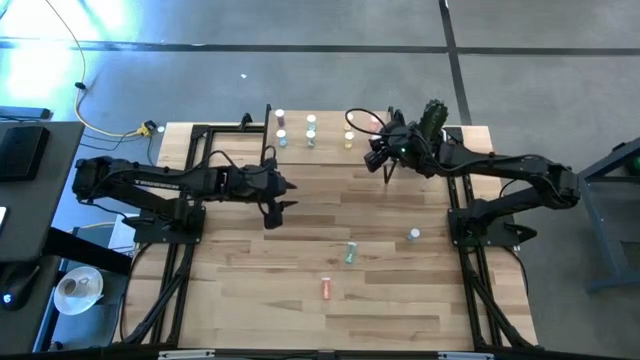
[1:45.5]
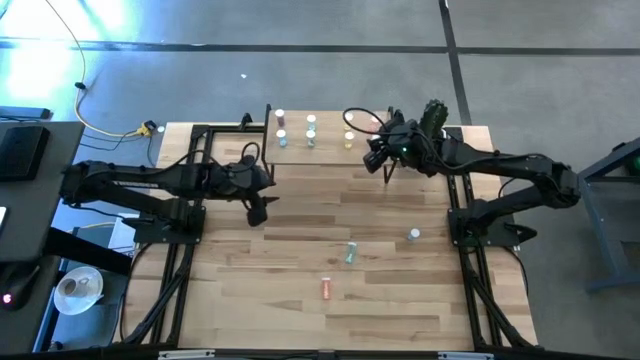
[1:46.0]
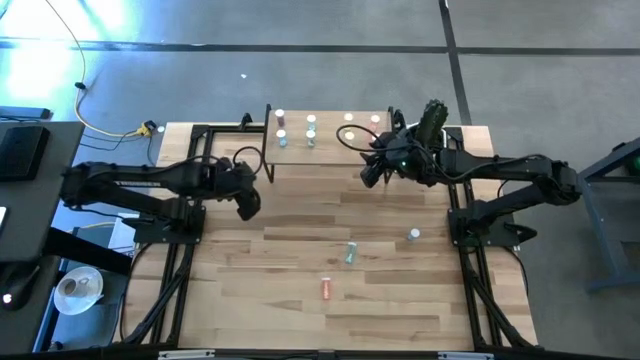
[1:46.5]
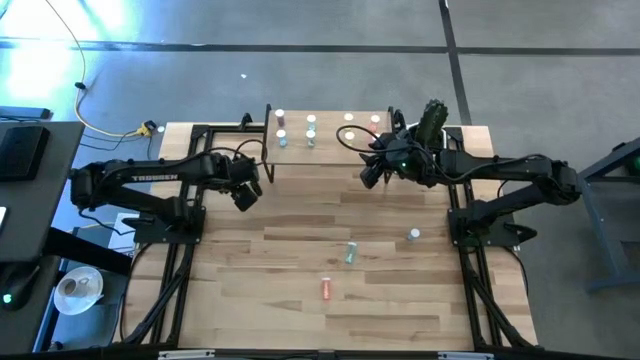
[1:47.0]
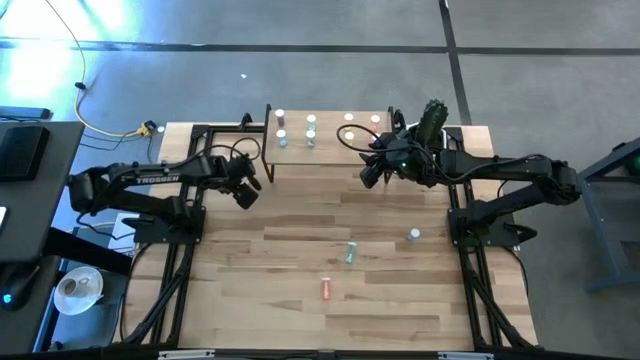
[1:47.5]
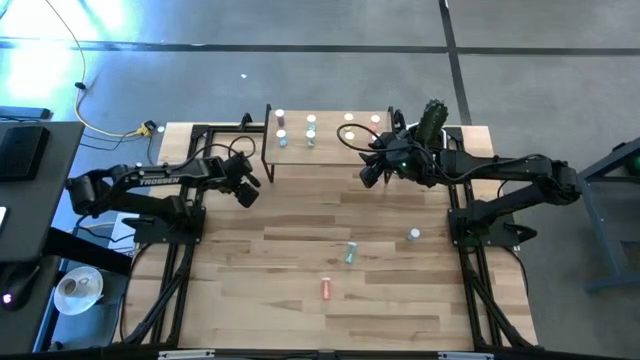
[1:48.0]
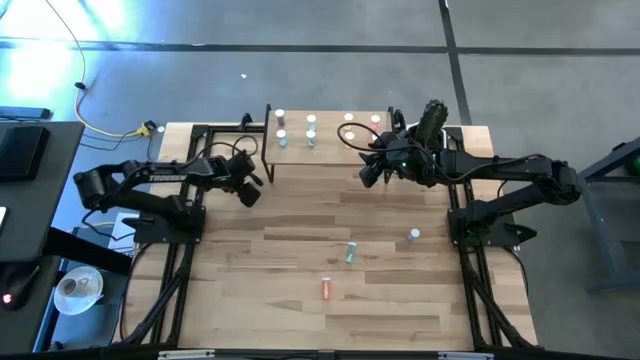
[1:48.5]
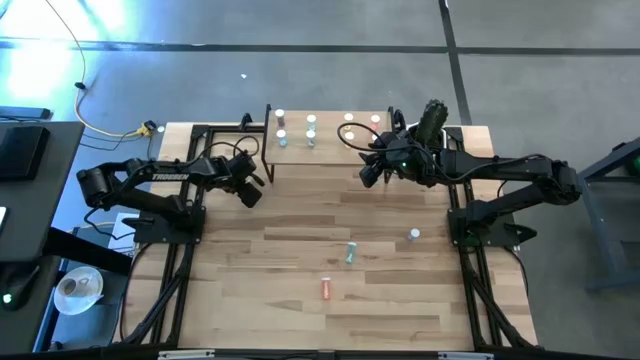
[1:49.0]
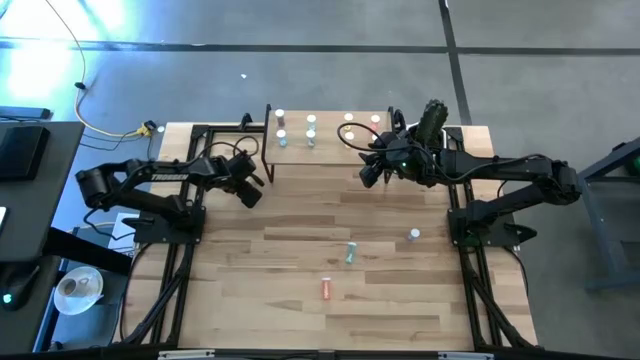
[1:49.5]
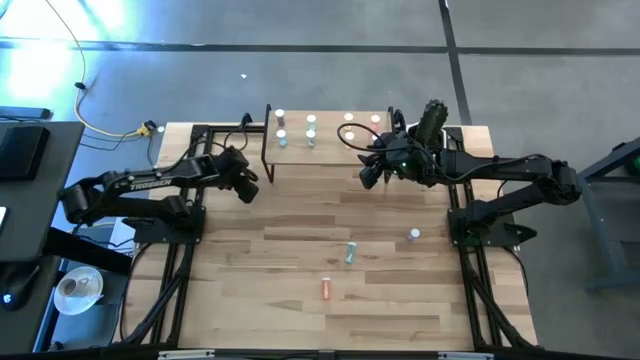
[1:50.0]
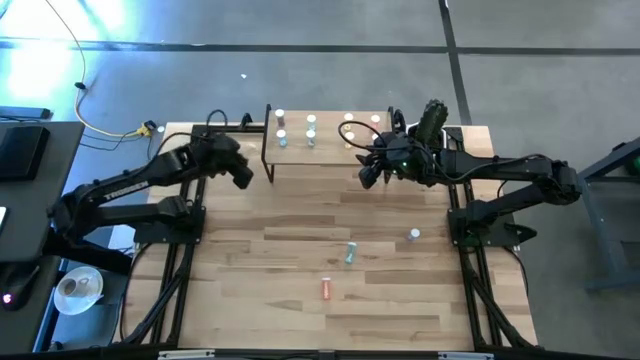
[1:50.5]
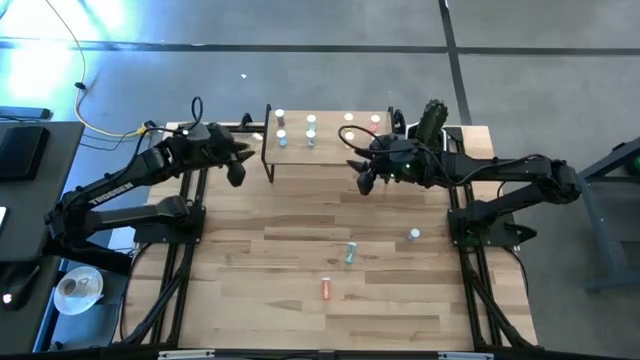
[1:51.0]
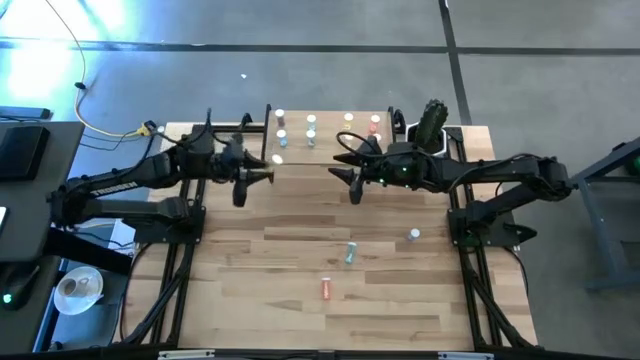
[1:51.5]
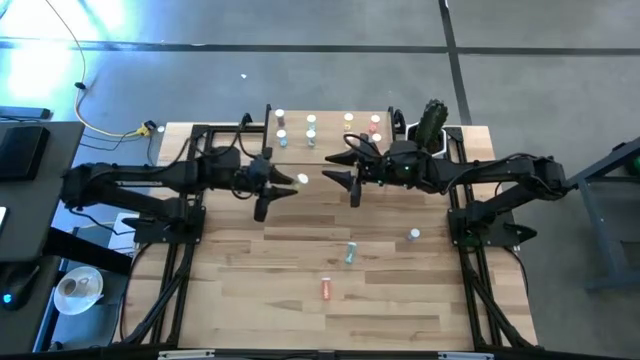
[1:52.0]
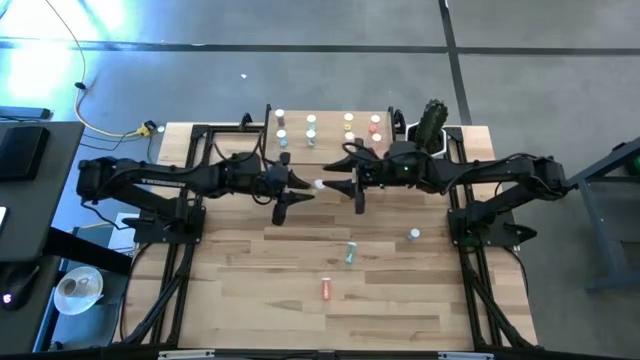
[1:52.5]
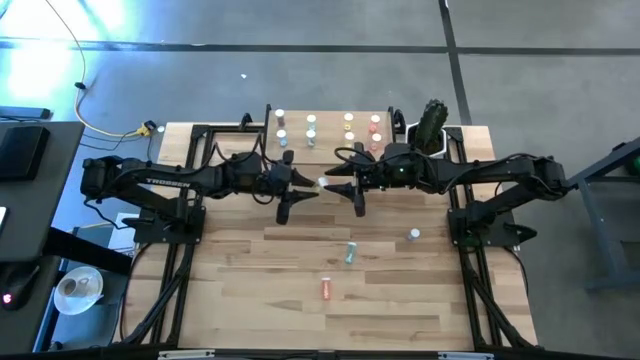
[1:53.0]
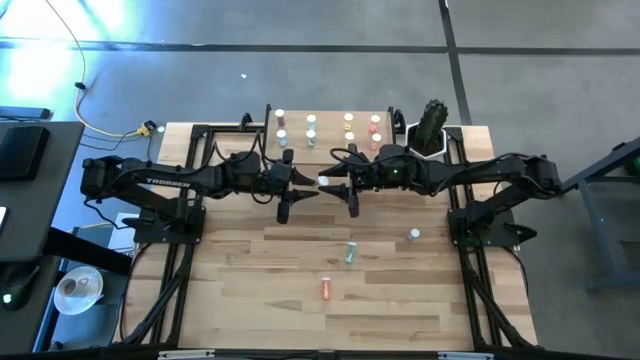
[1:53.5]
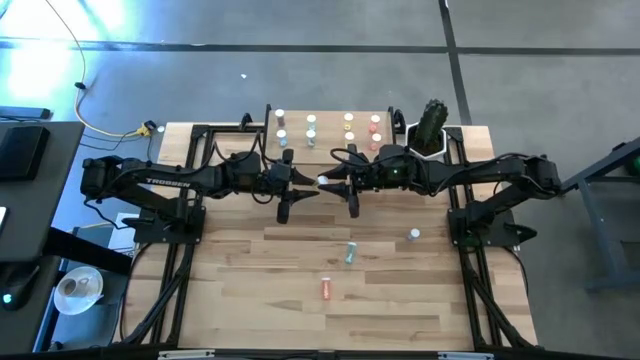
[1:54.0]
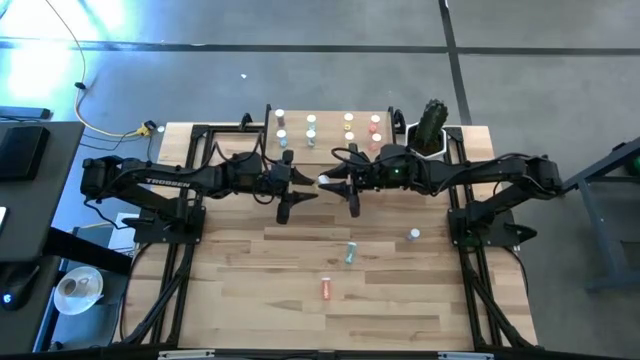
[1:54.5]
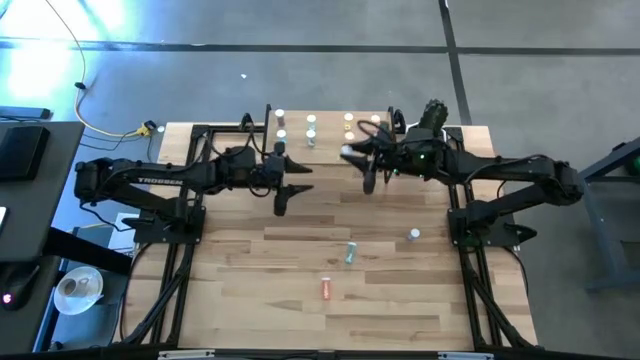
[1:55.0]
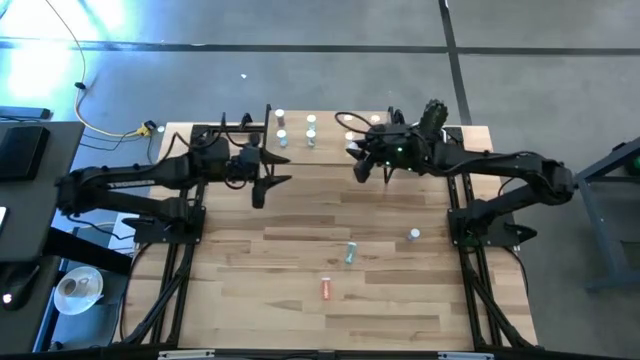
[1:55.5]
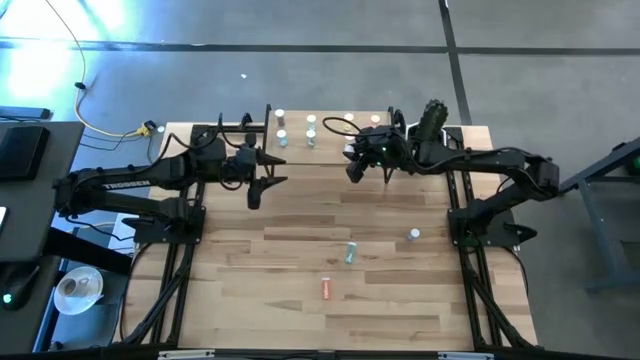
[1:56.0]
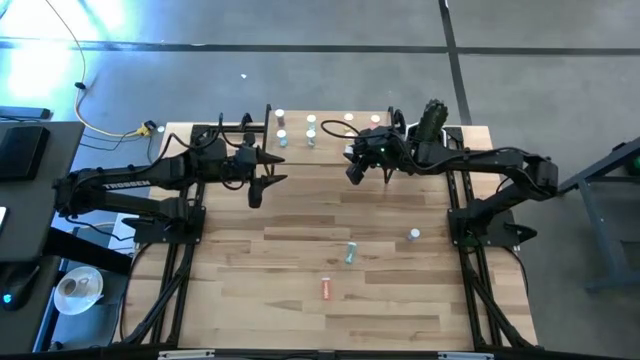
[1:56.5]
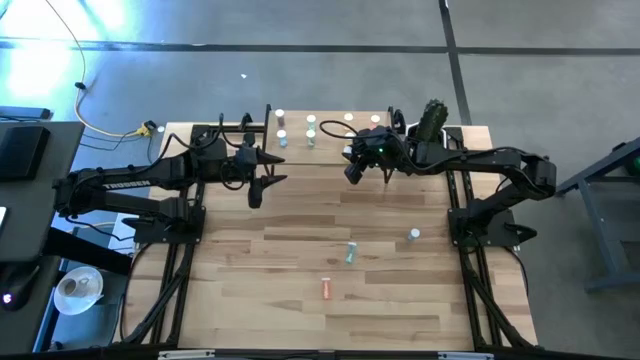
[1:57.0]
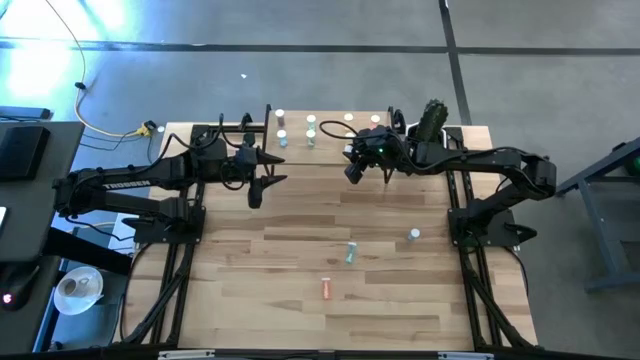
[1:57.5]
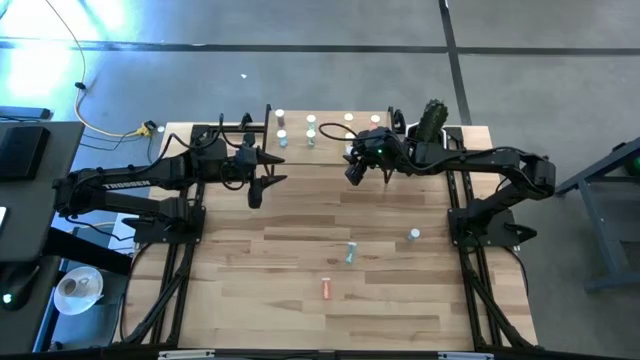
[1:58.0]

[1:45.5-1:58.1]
Task: Pick and place medicine bottles onto shelf by color
Put the yellow pill bottle on the shelf aligned with the other yellow pill bottles

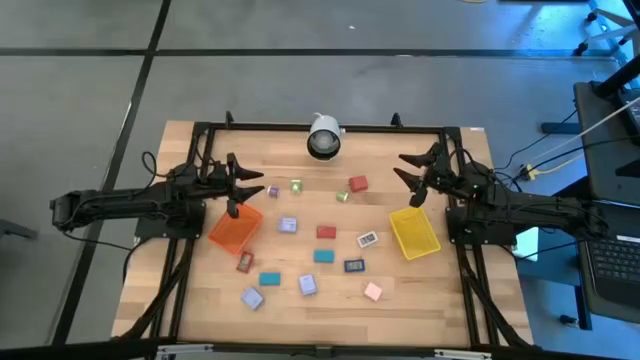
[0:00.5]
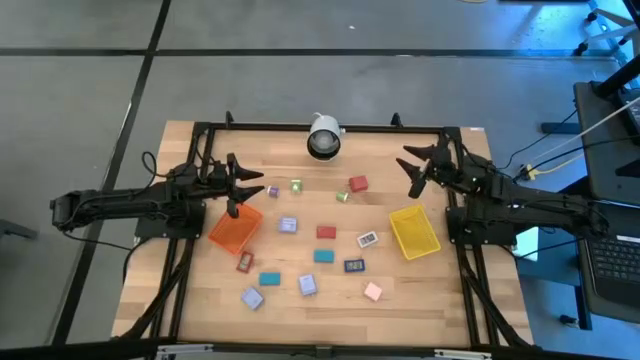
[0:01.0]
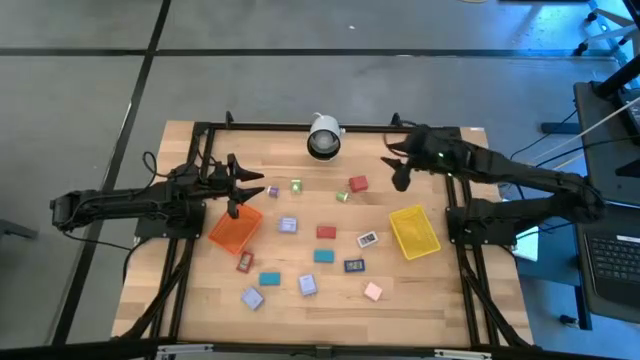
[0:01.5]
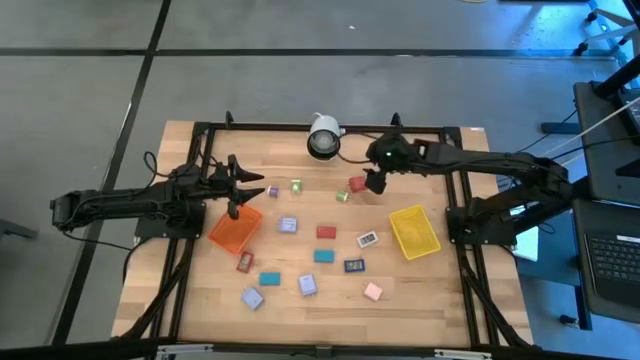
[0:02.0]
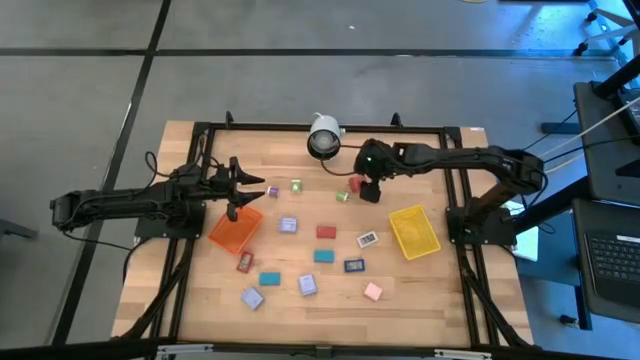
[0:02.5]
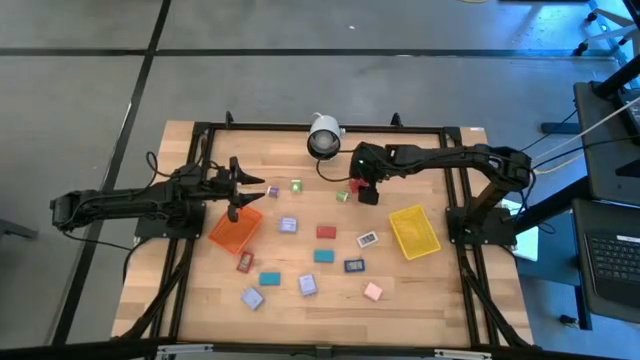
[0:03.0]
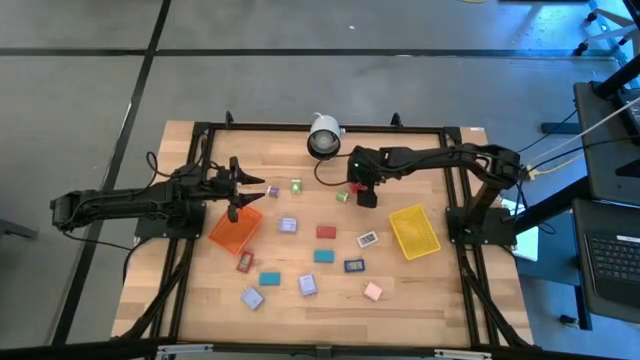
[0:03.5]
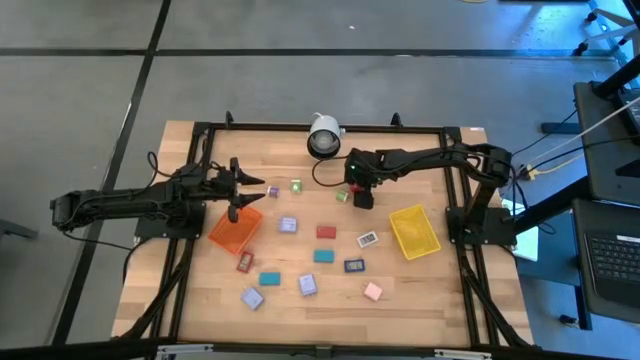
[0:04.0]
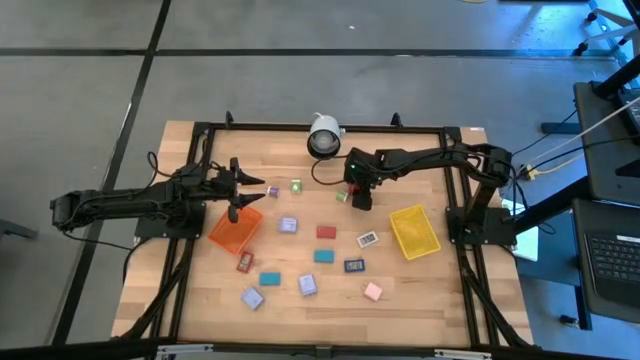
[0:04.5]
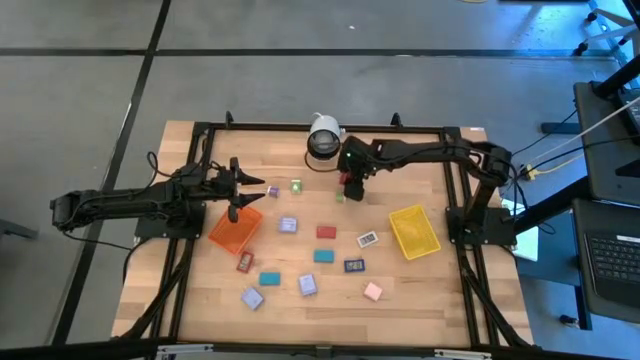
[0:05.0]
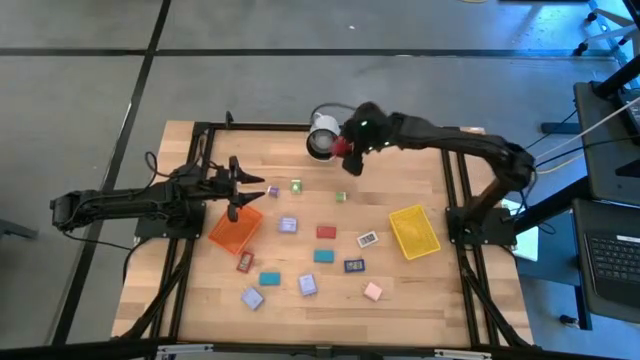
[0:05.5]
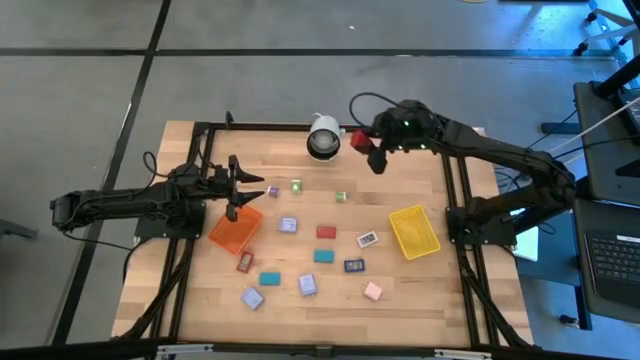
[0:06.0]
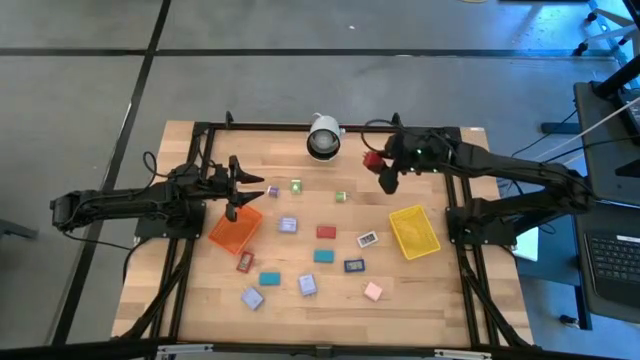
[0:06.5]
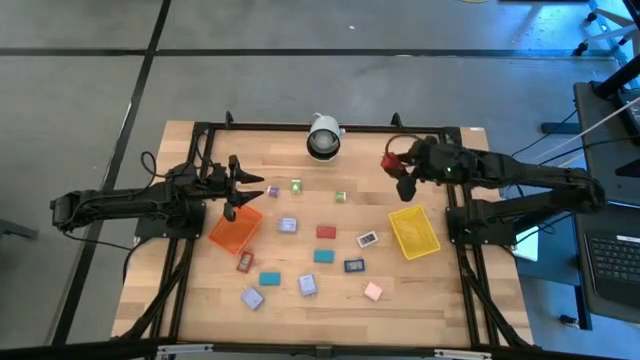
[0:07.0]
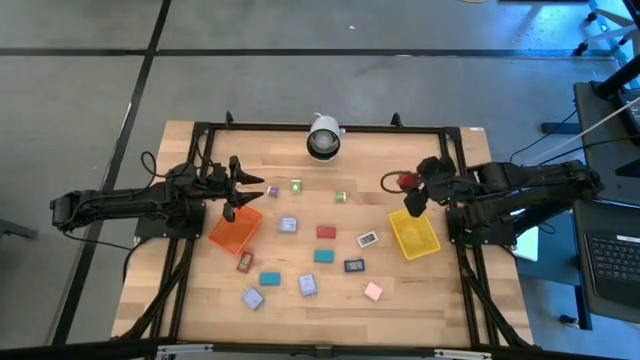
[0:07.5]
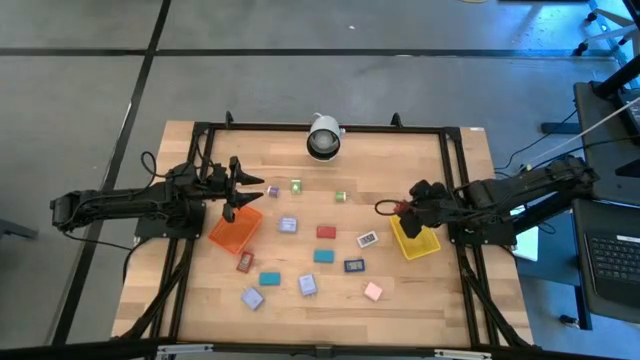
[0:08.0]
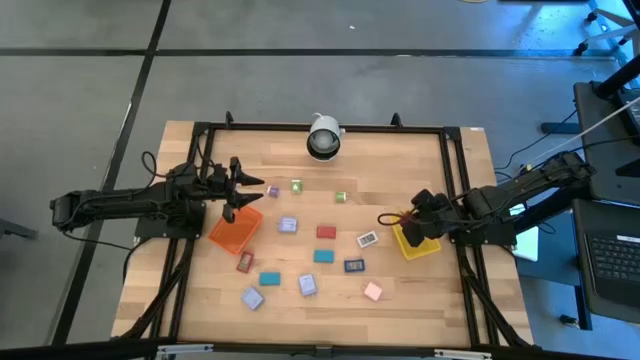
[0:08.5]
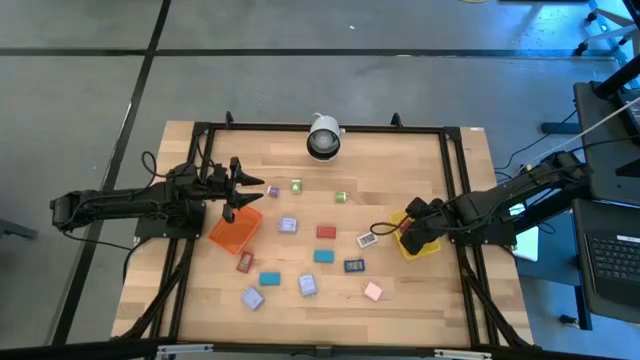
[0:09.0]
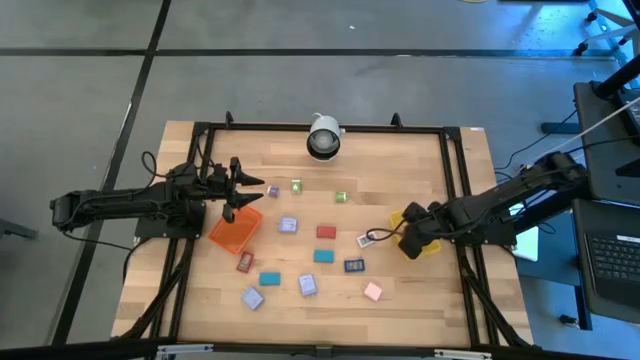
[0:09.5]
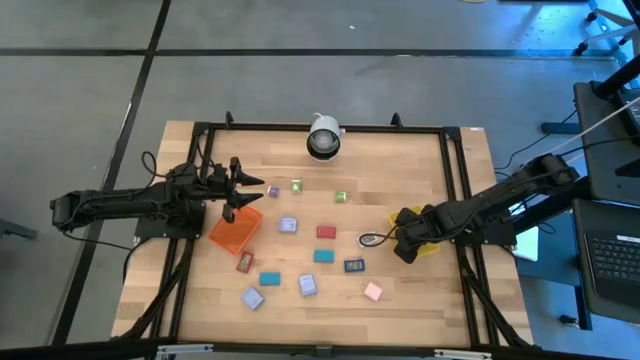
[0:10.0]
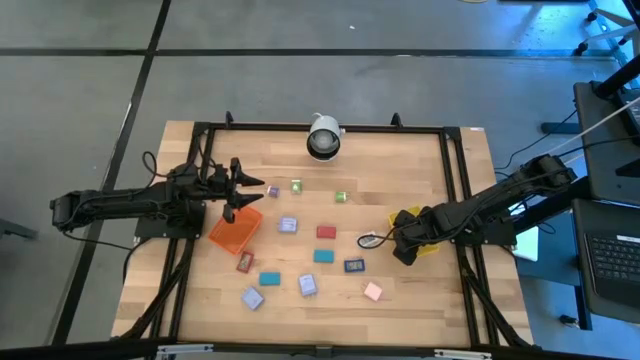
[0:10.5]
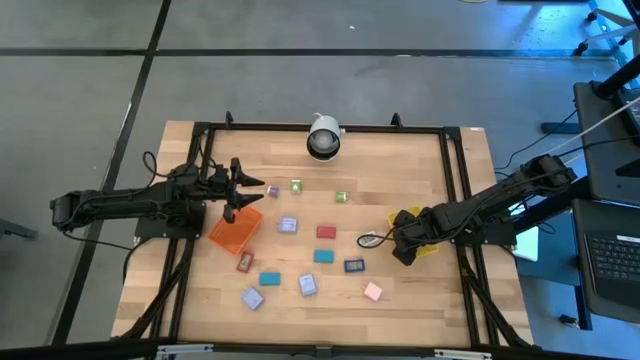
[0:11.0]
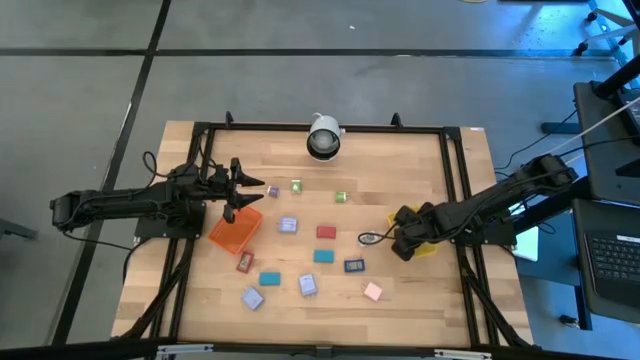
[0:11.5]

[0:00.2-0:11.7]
Task: Pick & Place Office items
Put the red charger adapter into the yellow basket
